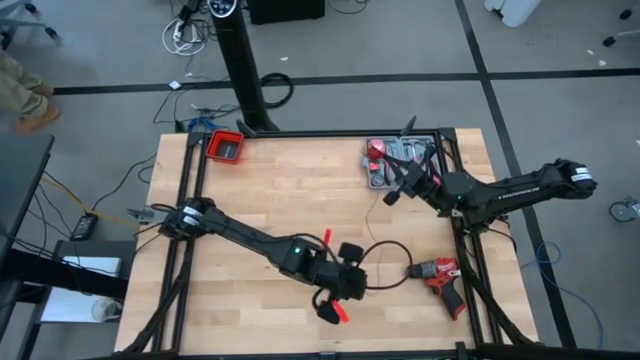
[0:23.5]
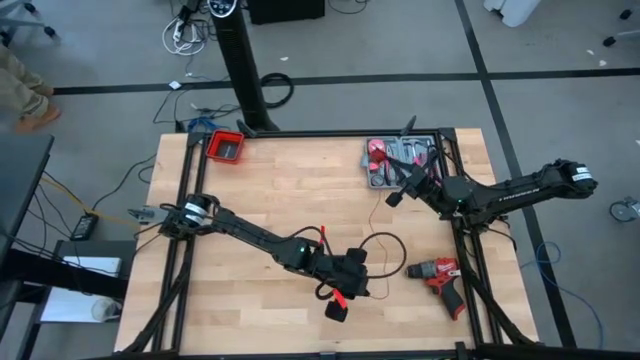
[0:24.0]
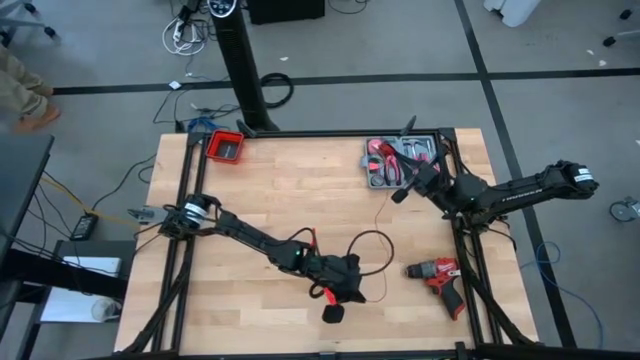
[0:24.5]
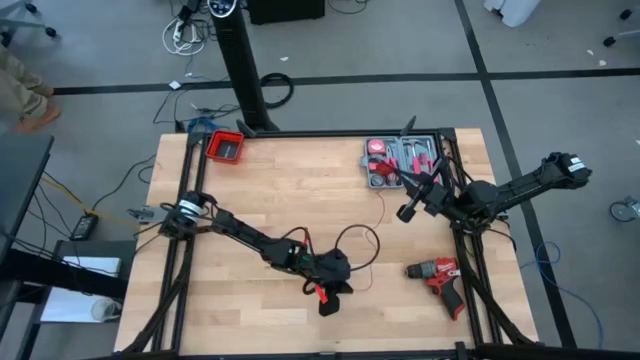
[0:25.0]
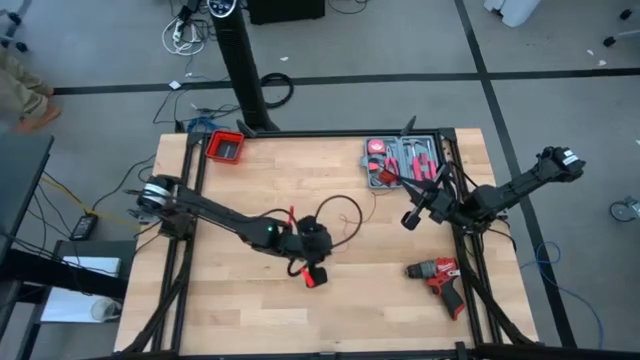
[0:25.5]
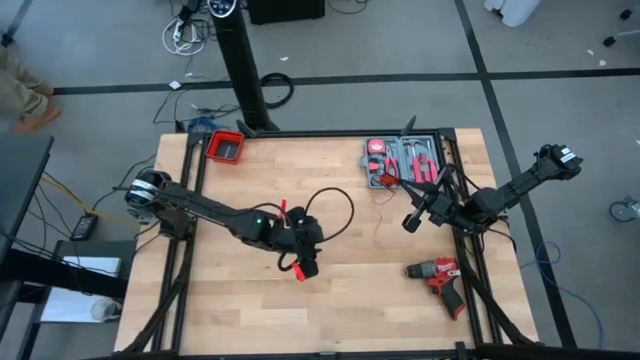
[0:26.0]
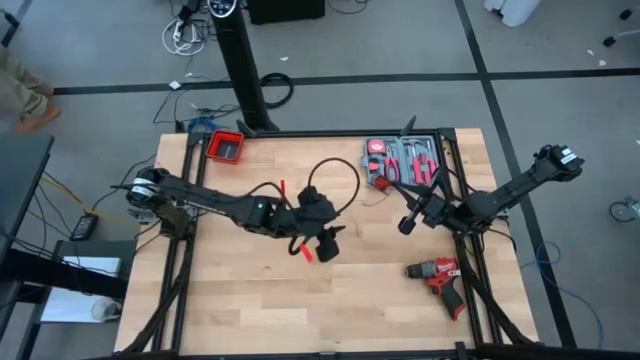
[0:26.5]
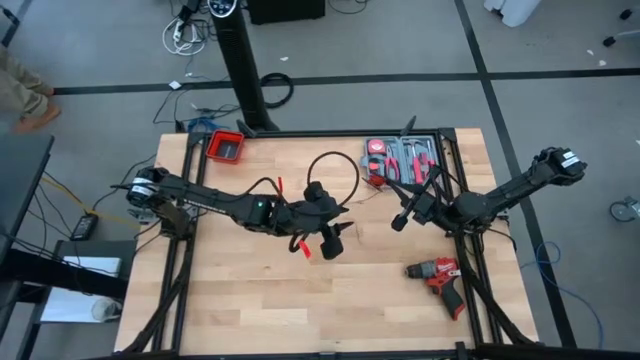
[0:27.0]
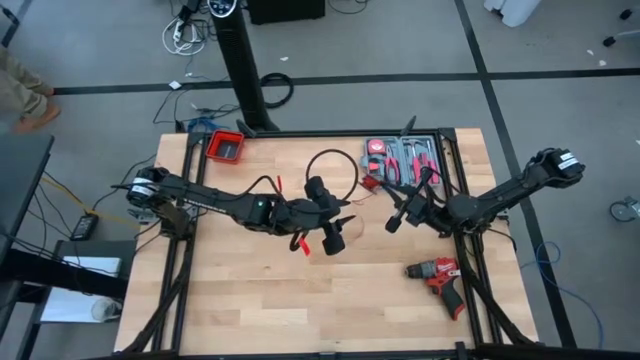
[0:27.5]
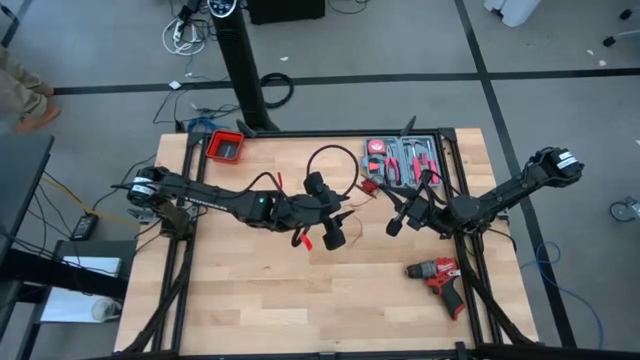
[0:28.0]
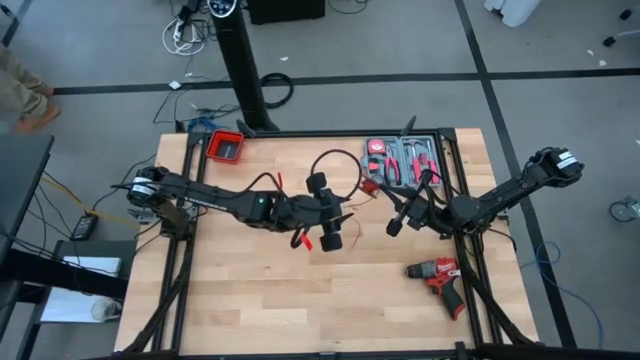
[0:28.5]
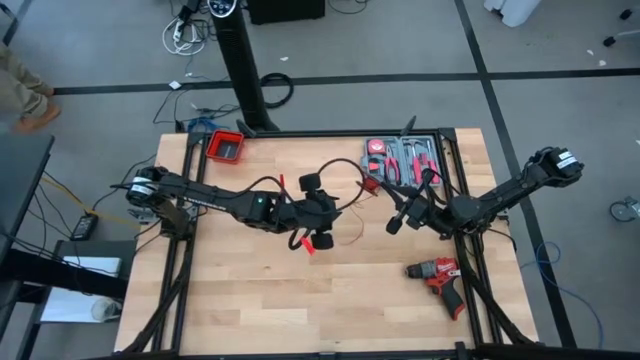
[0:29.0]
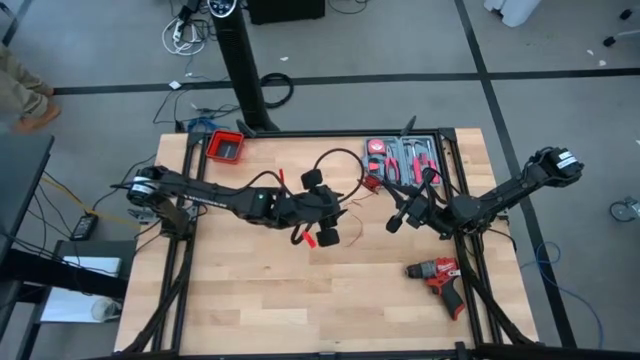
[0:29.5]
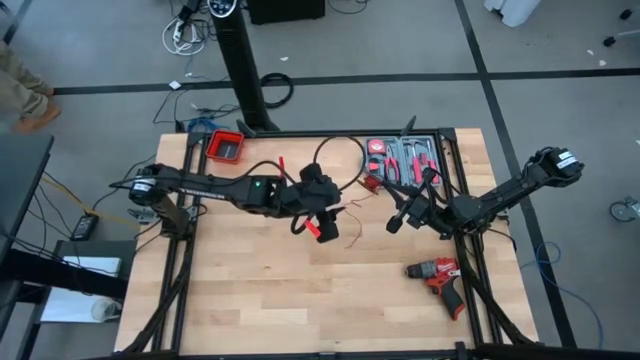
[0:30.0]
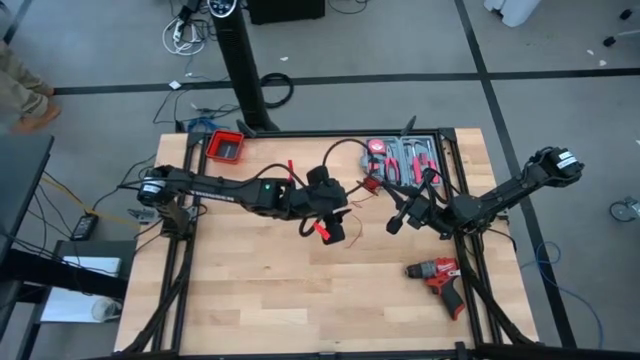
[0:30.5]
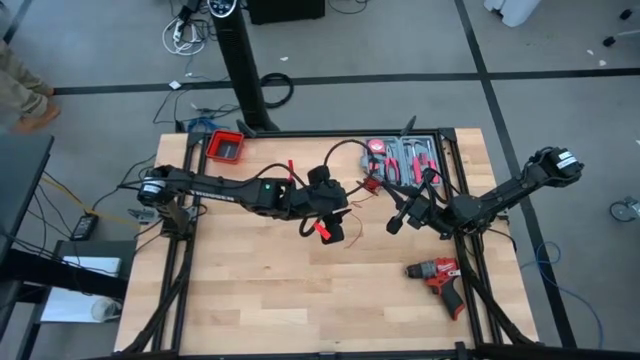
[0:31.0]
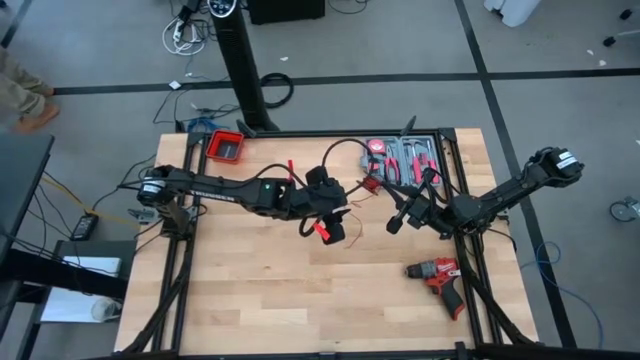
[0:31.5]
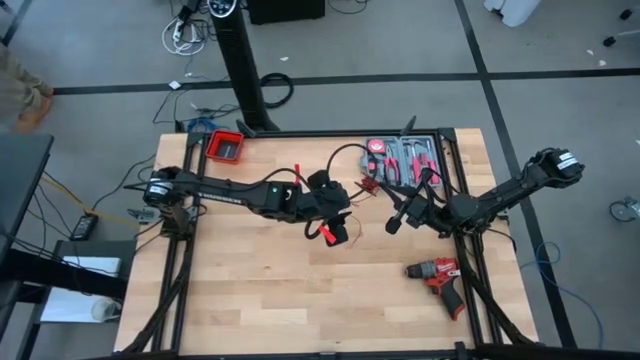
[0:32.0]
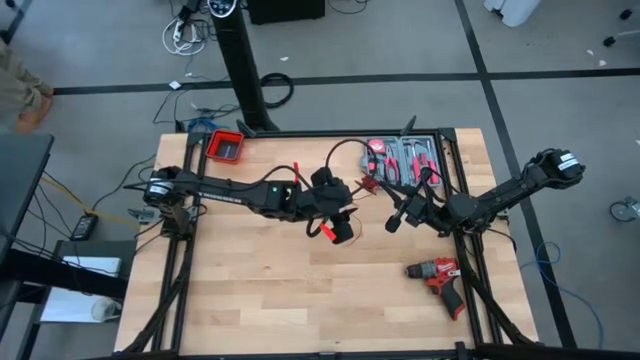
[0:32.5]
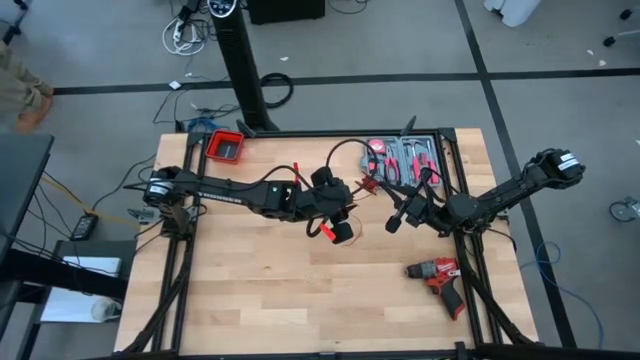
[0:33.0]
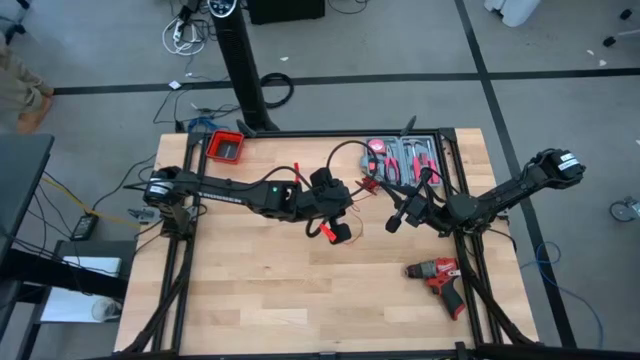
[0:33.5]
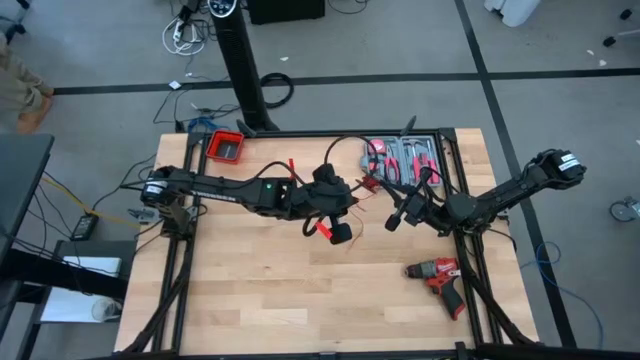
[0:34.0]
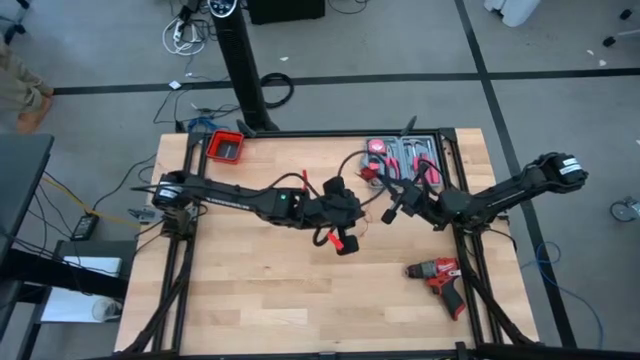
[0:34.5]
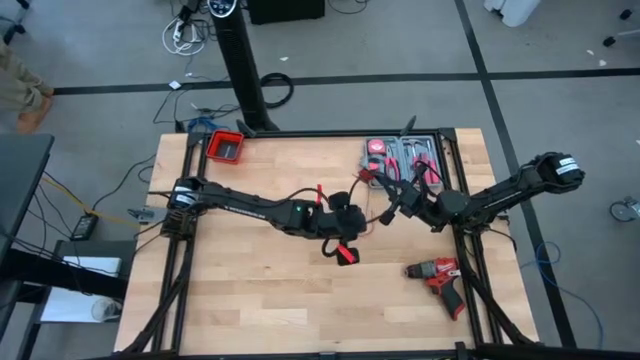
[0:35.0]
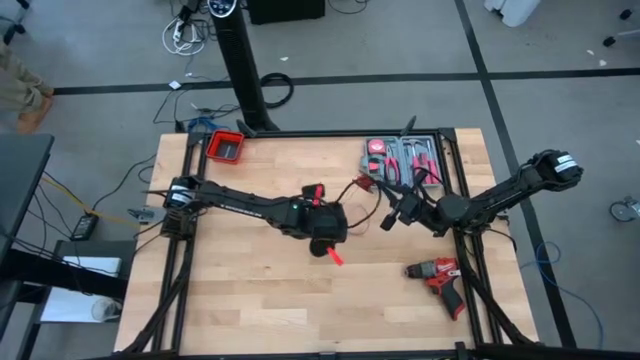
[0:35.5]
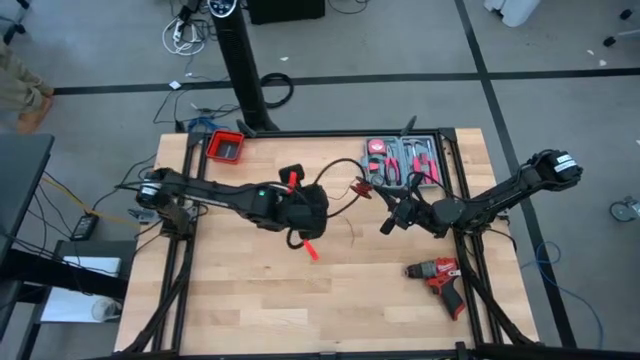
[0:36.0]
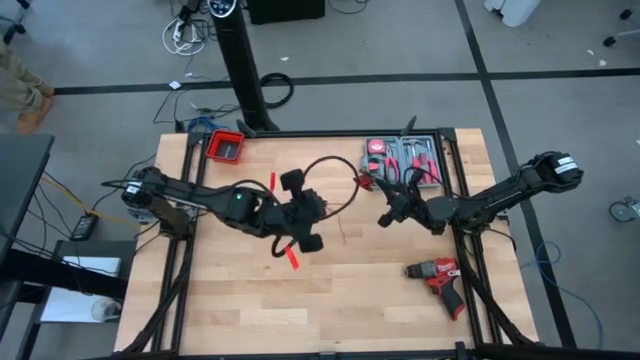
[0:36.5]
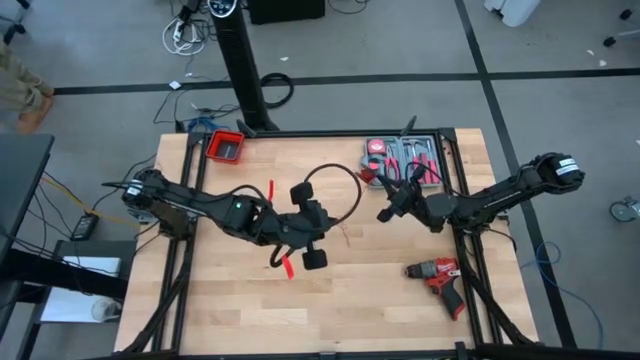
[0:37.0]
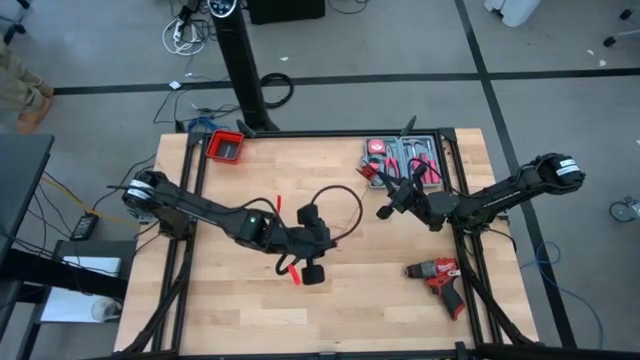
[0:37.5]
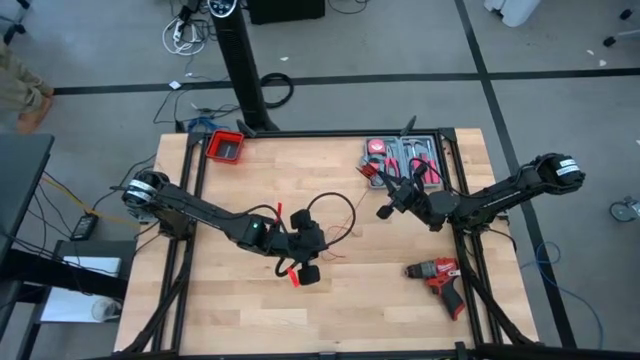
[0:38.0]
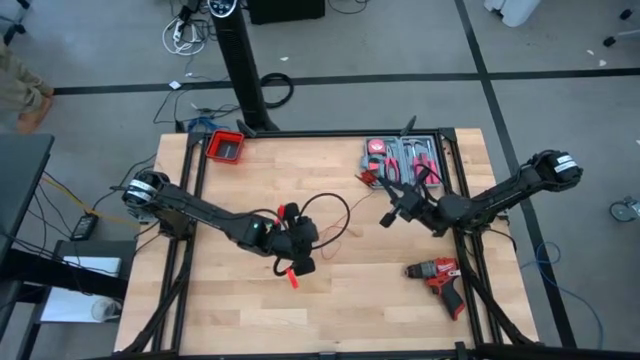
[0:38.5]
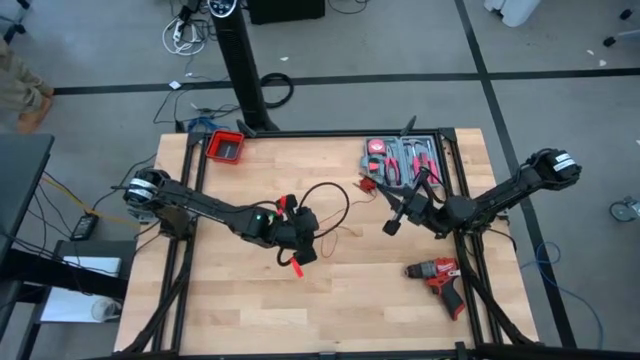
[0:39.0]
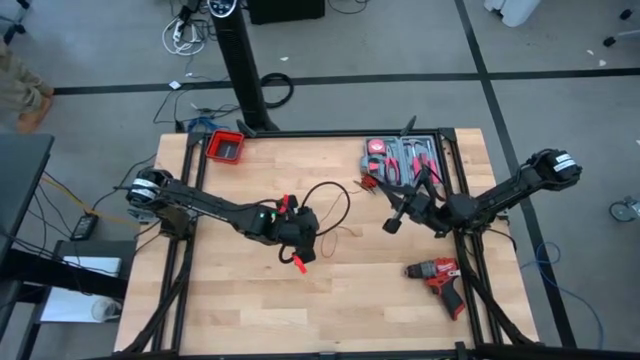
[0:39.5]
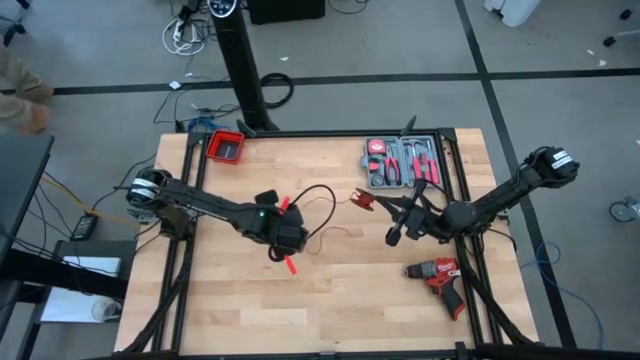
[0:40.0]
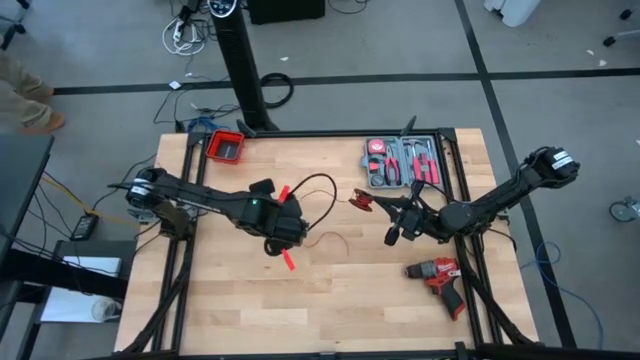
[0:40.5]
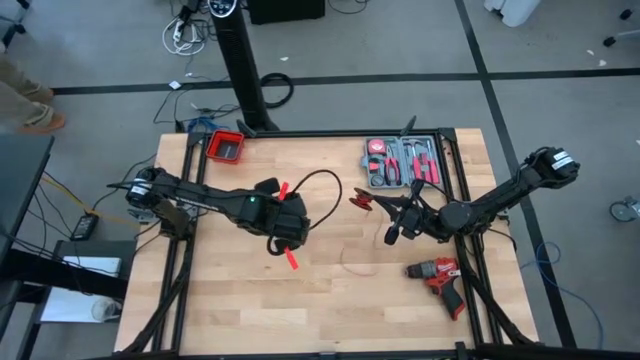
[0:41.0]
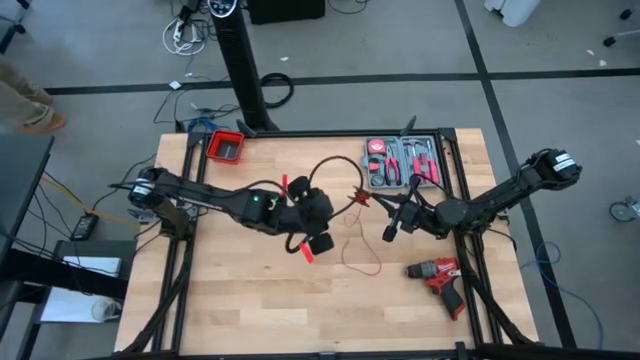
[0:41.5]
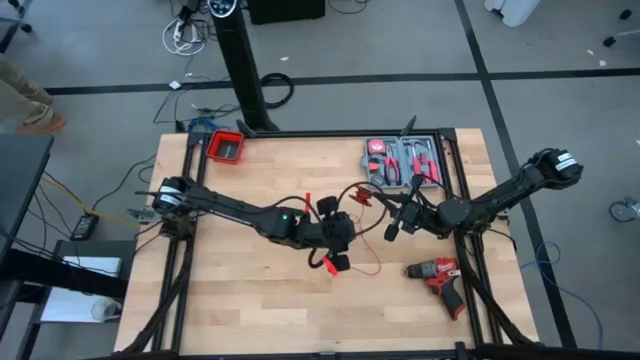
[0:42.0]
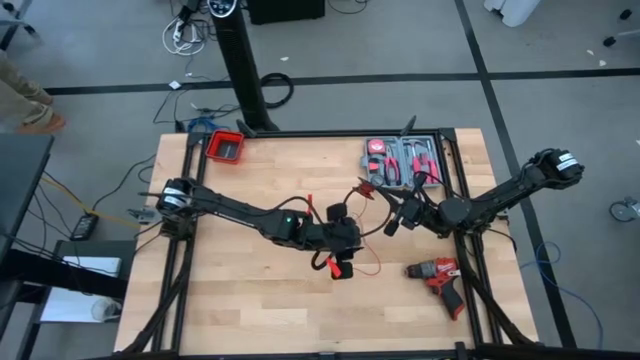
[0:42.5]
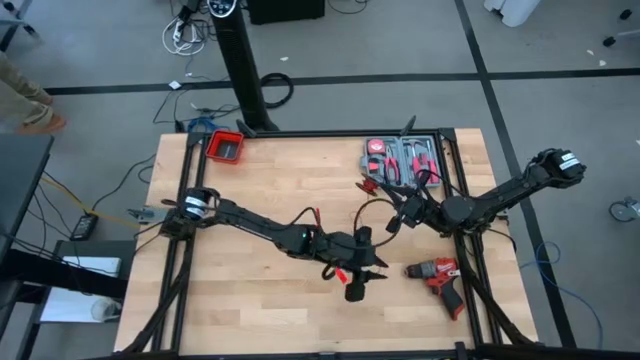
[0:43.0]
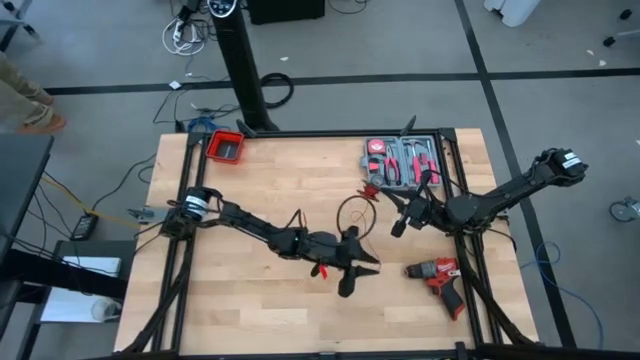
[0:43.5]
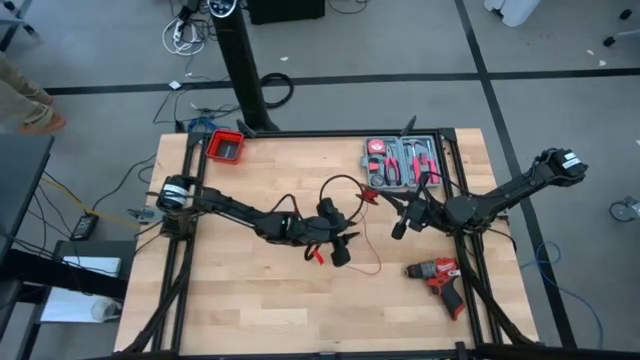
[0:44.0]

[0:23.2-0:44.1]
Task: Coil cords
Uncoil the red wire from the black spool
